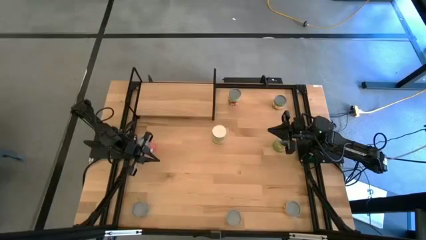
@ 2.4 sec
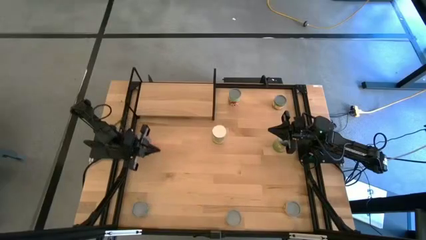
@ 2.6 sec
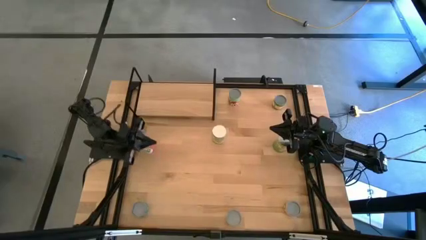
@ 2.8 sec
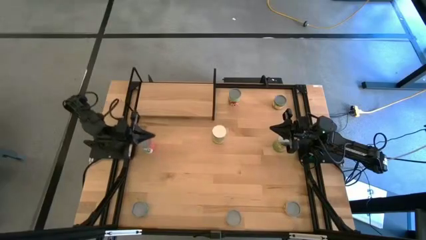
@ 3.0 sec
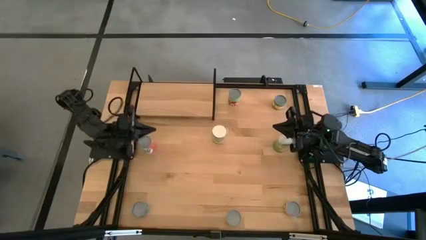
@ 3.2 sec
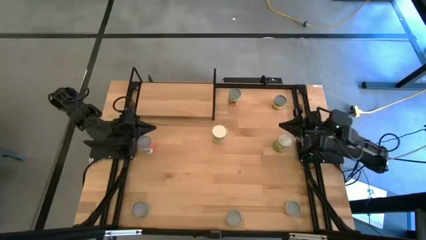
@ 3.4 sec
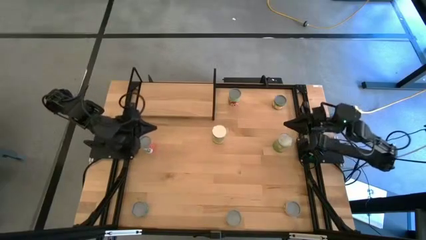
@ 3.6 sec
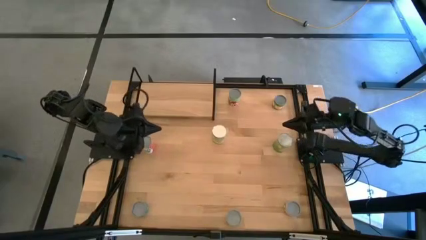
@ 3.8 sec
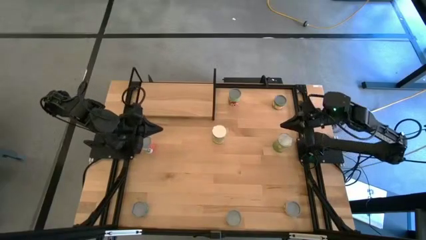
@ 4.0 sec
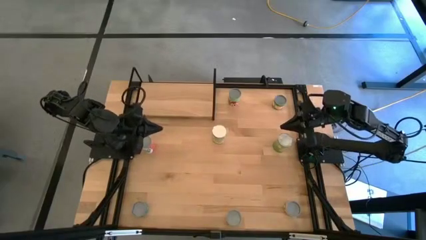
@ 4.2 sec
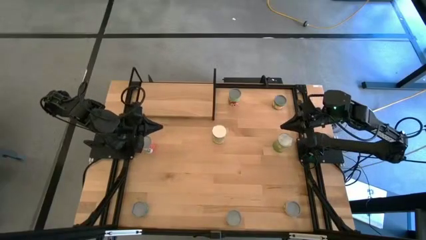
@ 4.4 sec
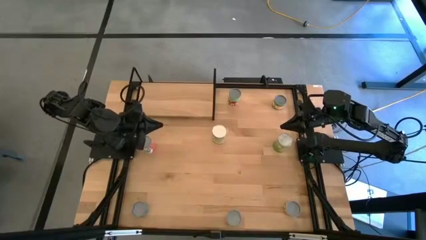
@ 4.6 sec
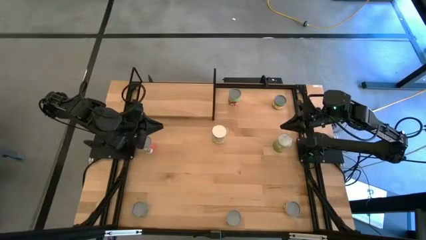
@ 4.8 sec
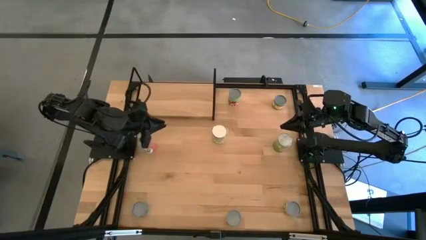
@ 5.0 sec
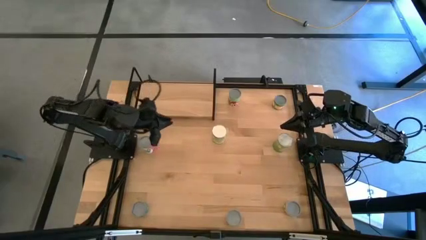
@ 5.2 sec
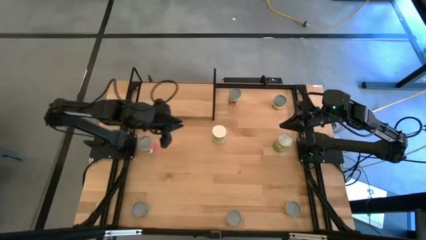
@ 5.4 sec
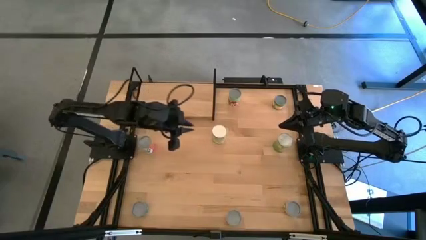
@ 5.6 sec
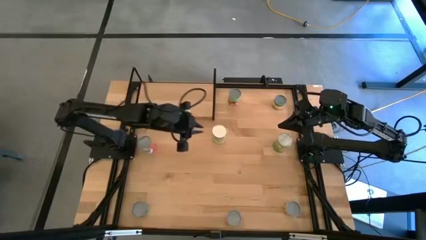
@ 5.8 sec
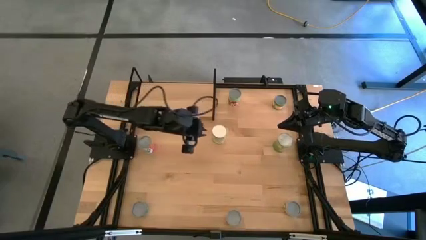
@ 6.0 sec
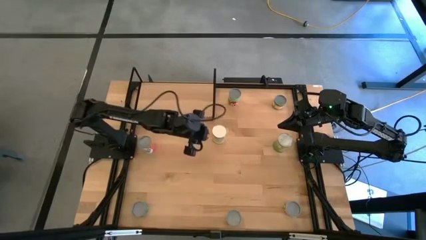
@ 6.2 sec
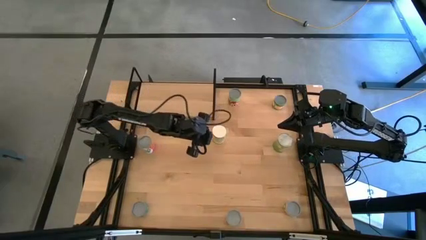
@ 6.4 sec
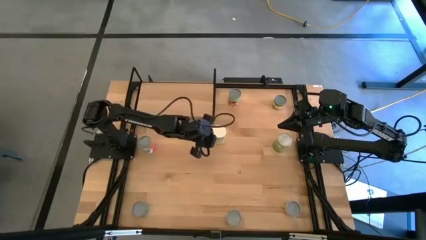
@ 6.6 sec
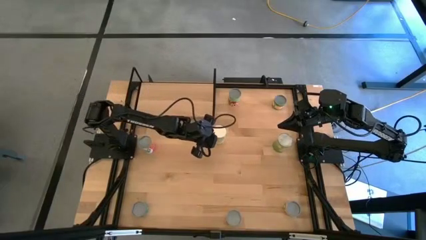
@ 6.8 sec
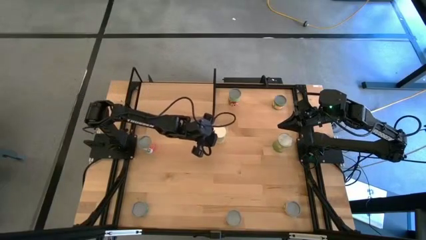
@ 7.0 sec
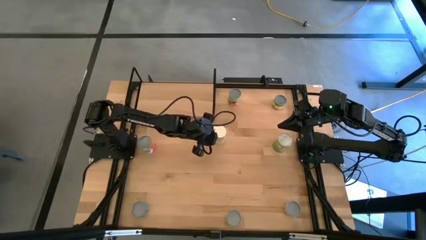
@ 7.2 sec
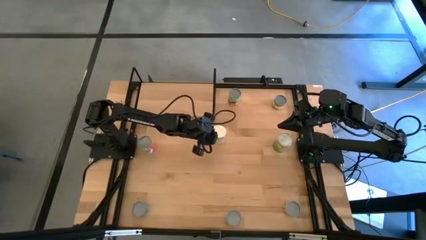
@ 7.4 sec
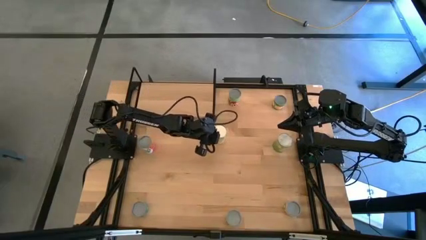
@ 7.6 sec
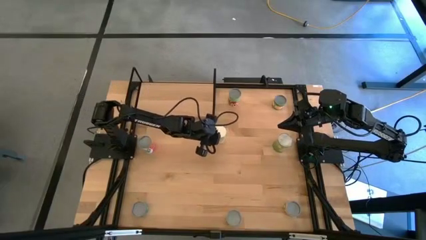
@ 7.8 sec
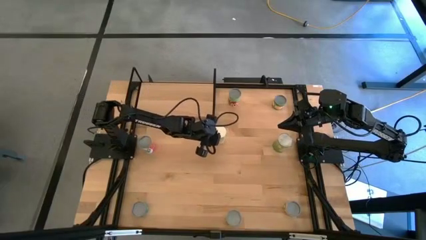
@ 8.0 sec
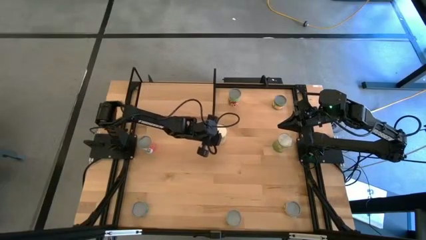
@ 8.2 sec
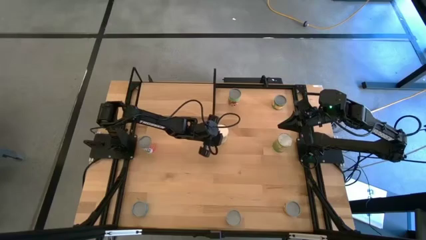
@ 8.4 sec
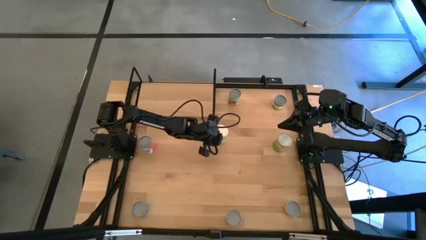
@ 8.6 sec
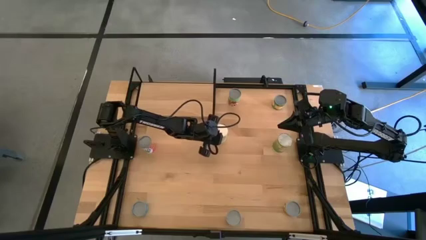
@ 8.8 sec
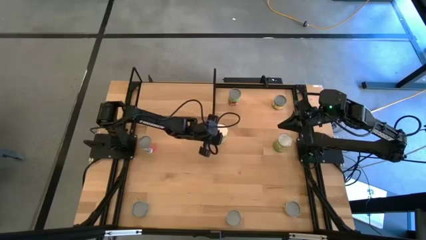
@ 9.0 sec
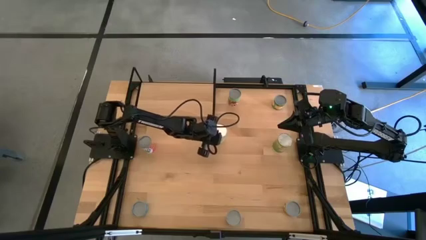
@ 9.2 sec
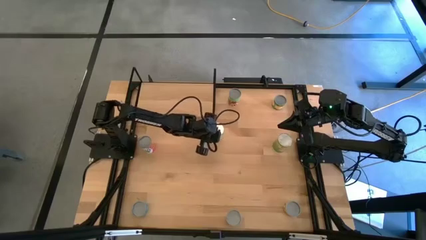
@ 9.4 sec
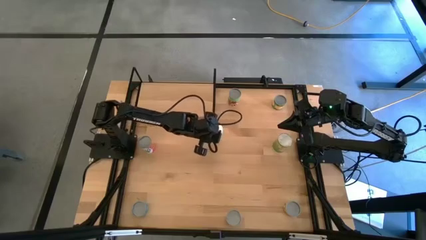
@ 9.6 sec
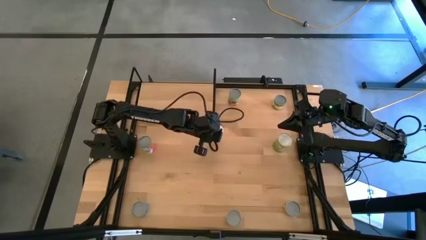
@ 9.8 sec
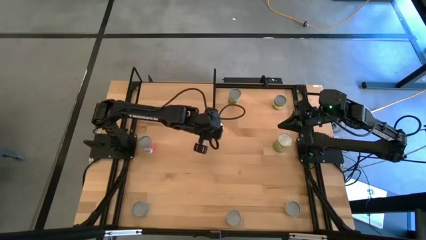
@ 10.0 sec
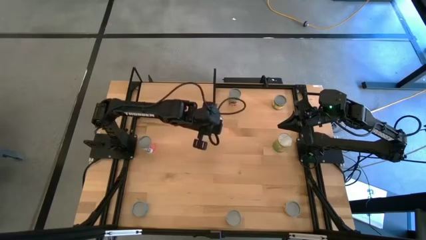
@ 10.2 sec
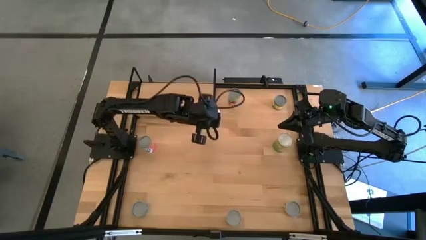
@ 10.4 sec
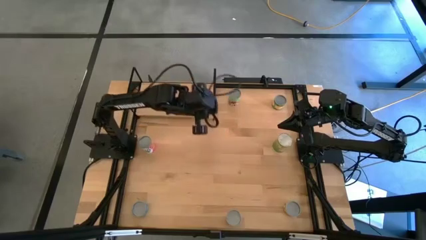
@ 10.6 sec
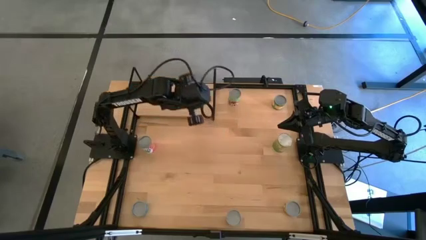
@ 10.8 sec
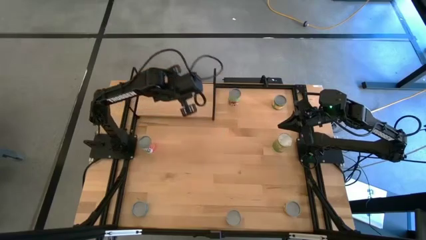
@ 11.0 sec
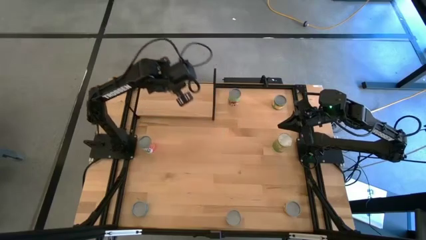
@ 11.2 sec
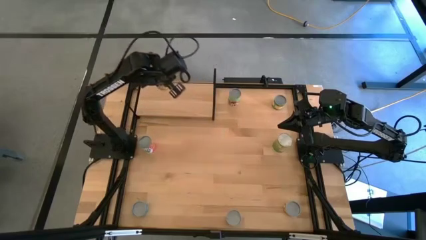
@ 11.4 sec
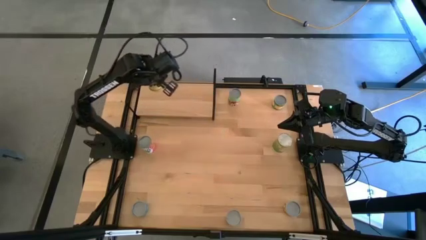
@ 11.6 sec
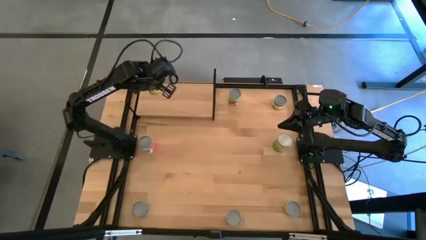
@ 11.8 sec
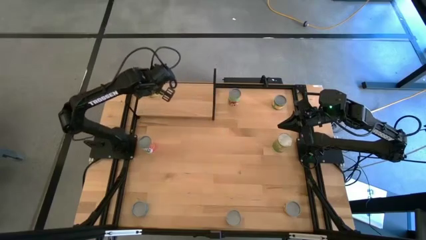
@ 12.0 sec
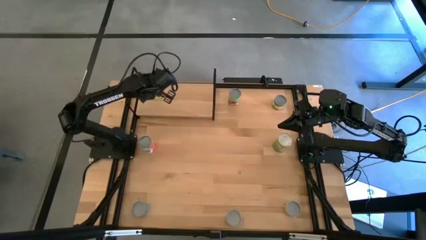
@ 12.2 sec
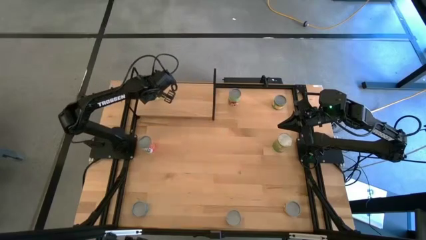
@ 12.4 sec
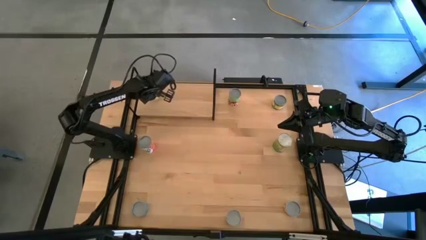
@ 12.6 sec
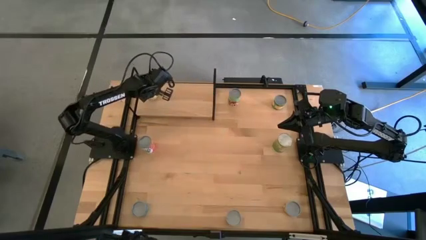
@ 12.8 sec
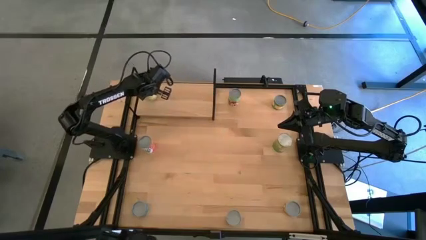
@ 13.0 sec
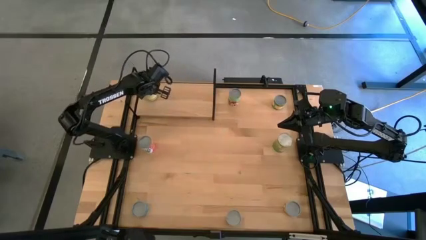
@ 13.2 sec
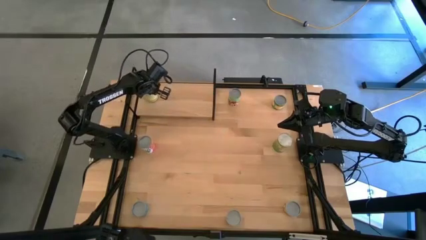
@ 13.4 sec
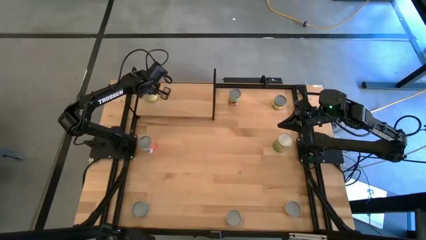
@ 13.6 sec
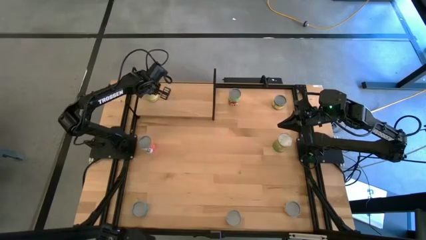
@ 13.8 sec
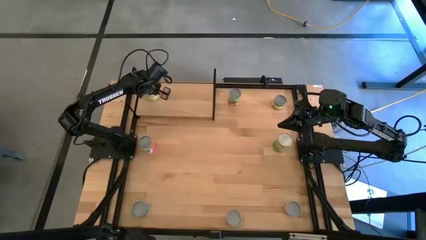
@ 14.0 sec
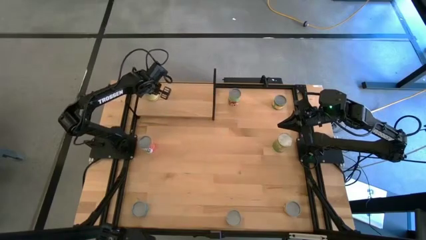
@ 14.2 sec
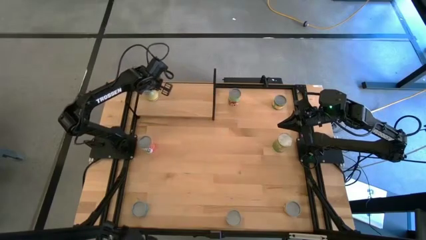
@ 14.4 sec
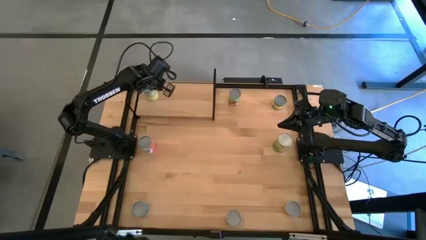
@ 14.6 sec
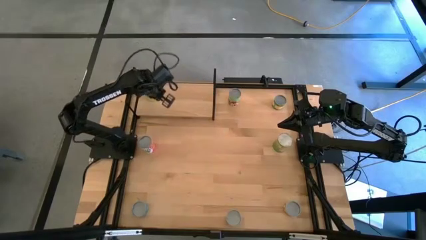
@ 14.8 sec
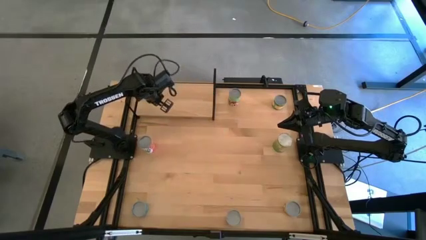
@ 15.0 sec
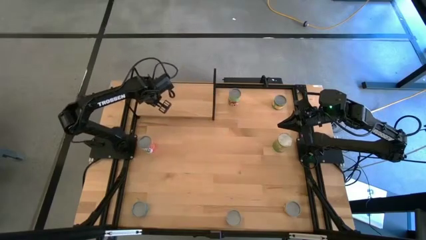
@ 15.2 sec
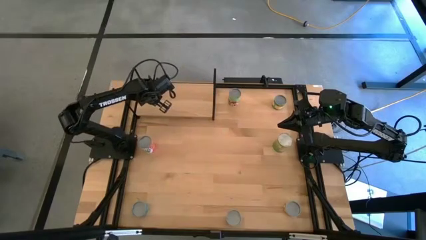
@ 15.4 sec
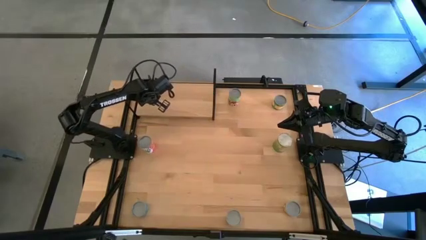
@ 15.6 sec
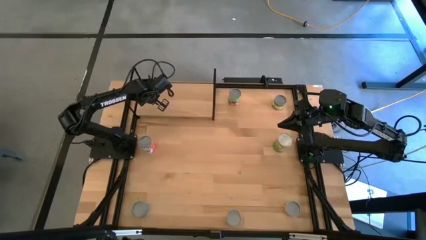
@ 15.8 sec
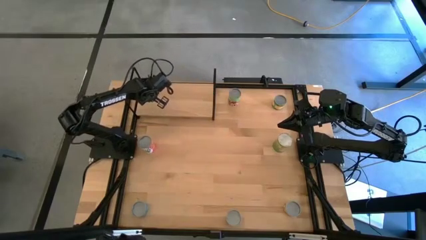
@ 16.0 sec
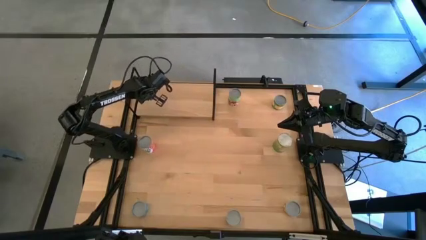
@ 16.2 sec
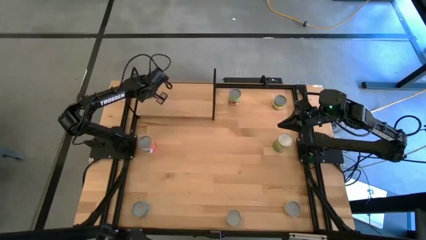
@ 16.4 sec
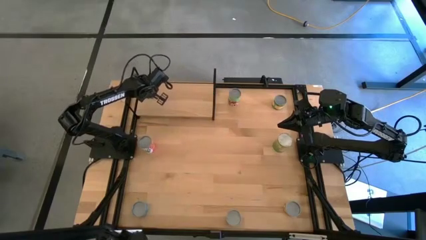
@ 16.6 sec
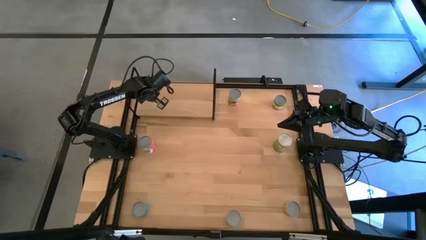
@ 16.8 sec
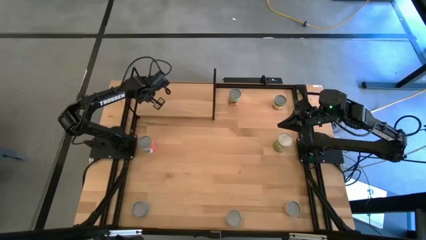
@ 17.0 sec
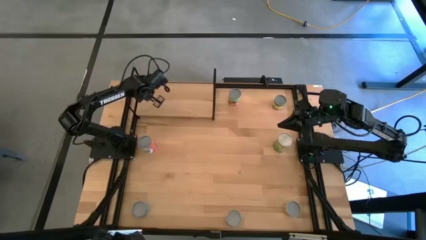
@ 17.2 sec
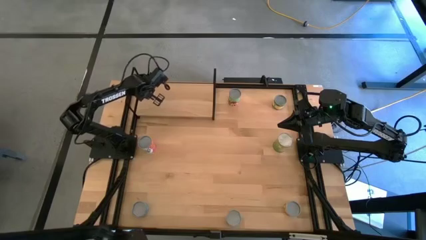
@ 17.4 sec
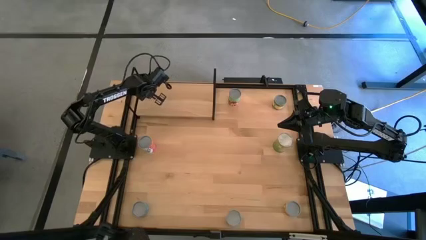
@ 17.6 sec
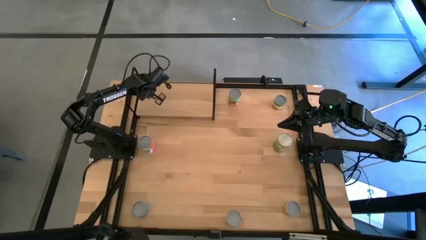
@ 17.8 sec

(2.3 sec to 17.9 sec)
Task: Pick and place cans onto a shelf
Put the canned carrot on the shelf
